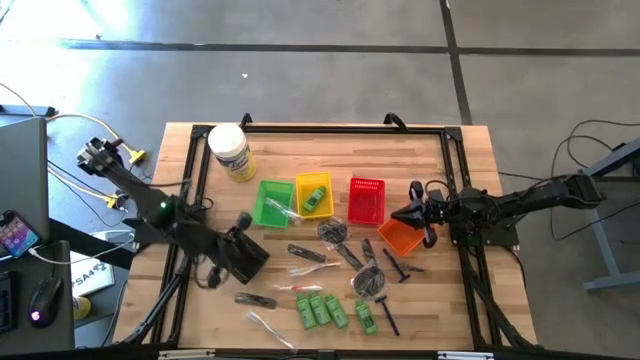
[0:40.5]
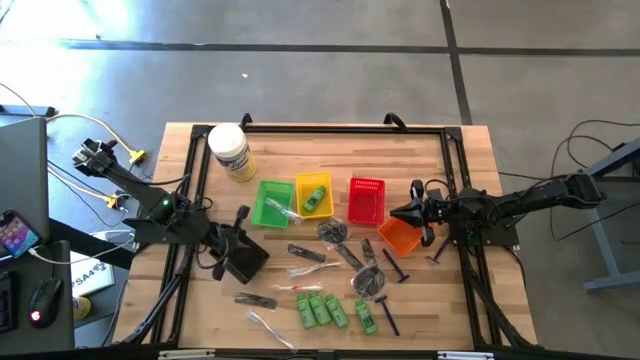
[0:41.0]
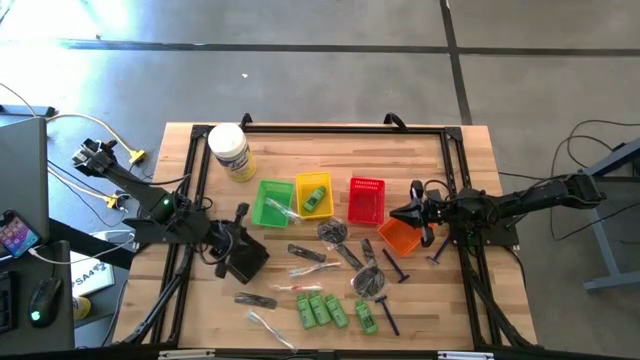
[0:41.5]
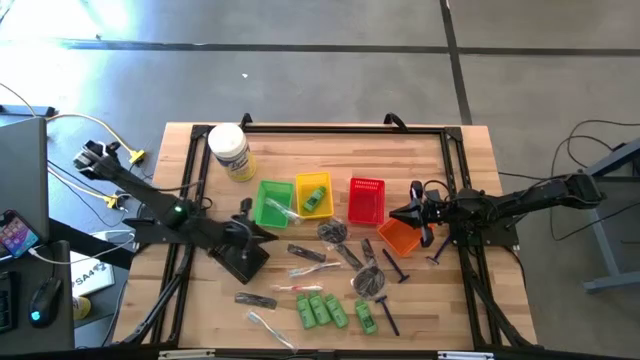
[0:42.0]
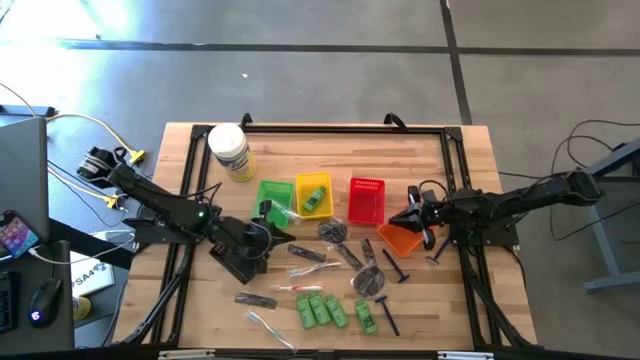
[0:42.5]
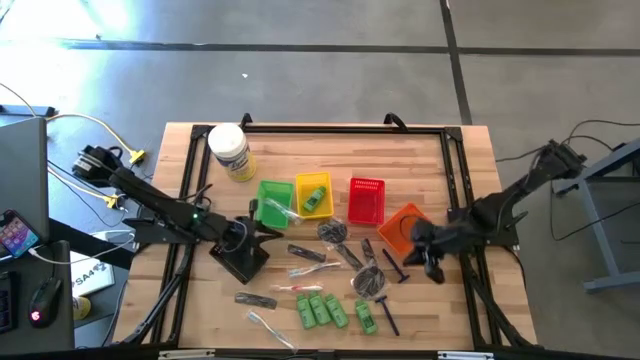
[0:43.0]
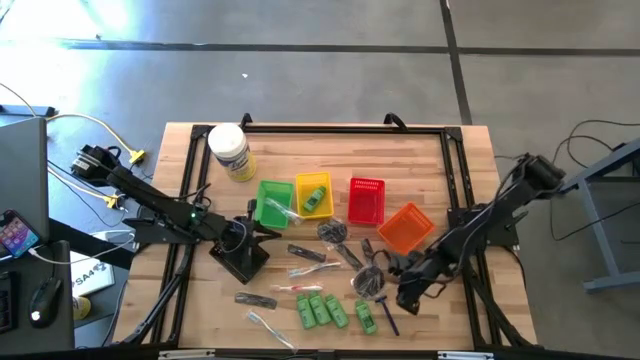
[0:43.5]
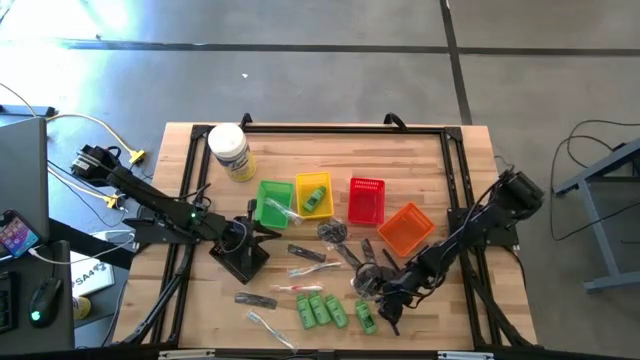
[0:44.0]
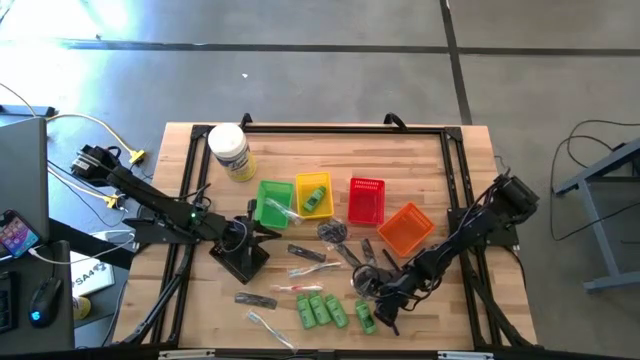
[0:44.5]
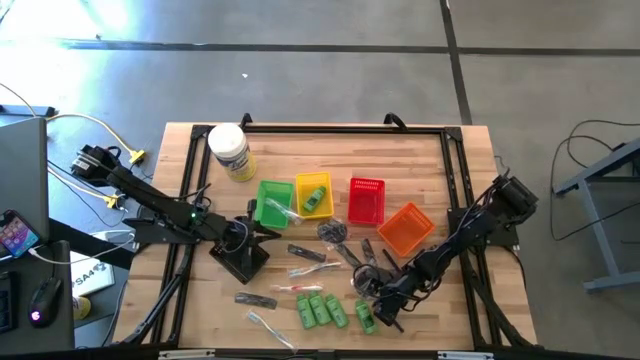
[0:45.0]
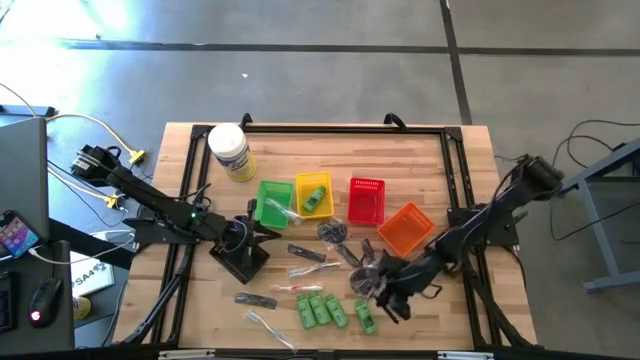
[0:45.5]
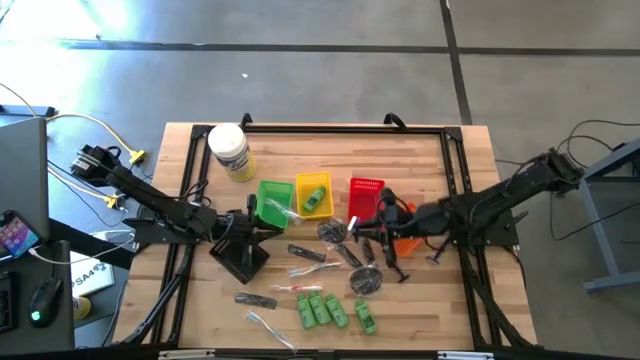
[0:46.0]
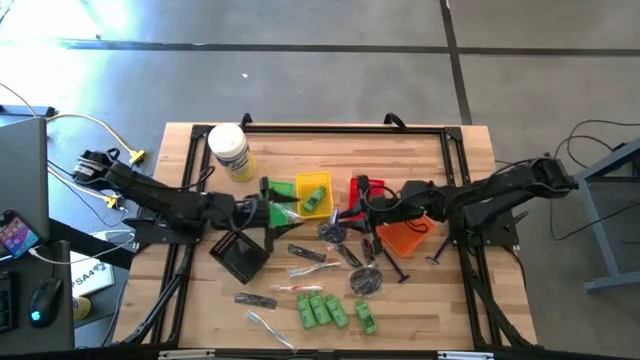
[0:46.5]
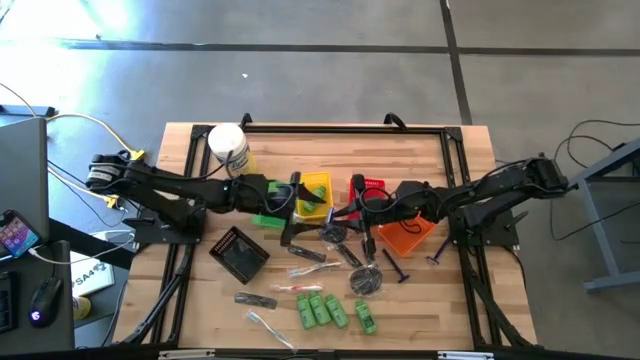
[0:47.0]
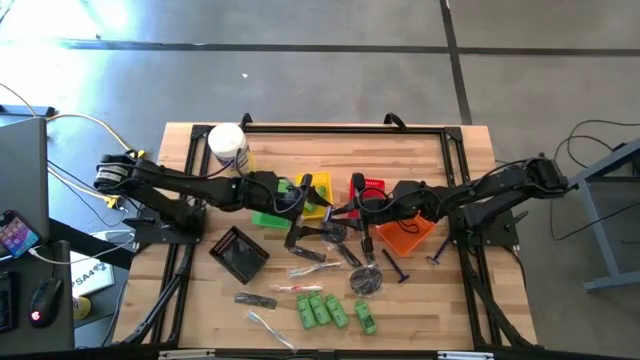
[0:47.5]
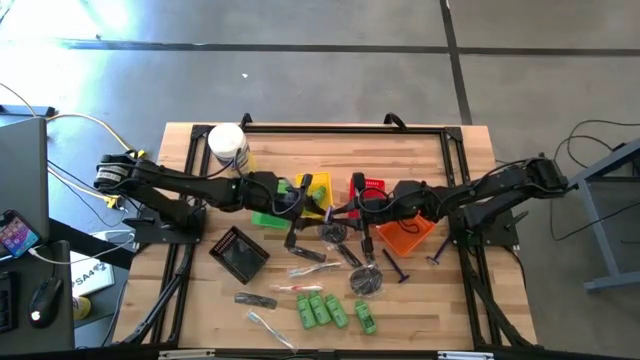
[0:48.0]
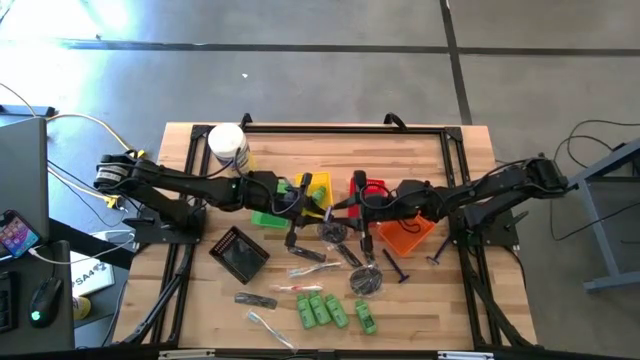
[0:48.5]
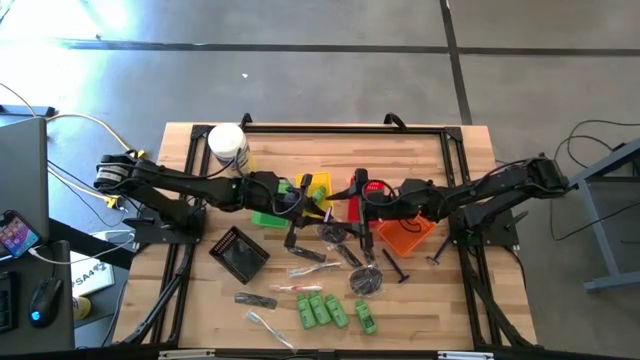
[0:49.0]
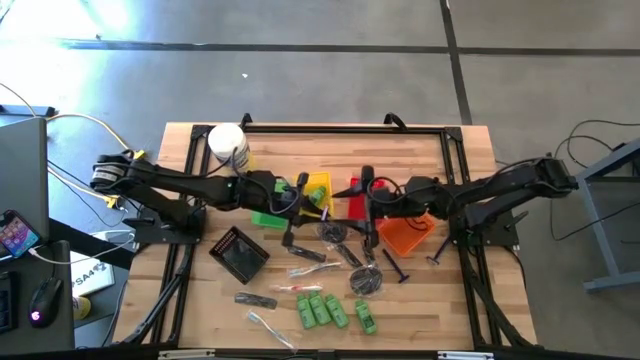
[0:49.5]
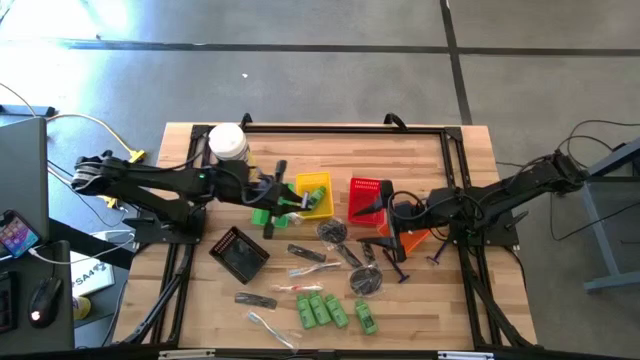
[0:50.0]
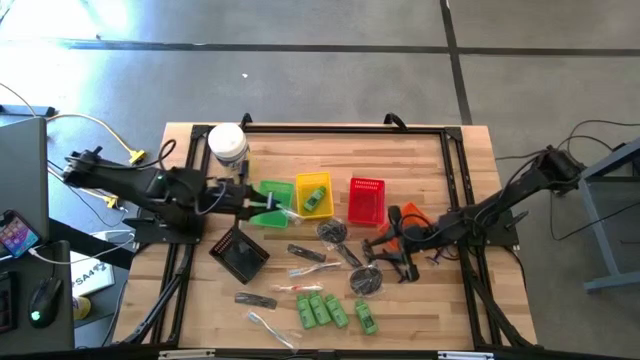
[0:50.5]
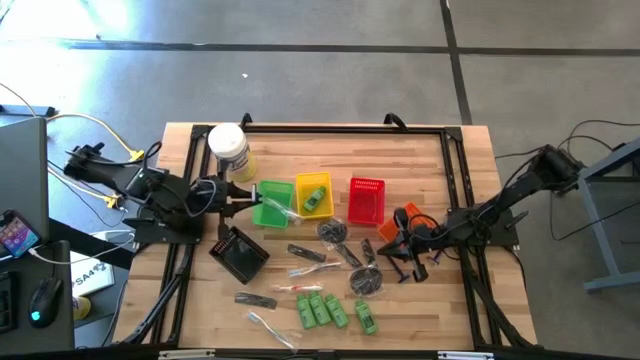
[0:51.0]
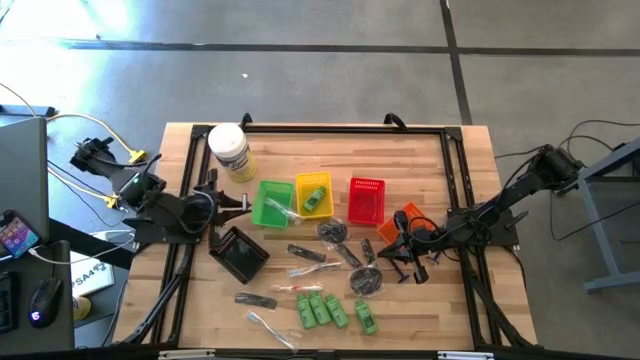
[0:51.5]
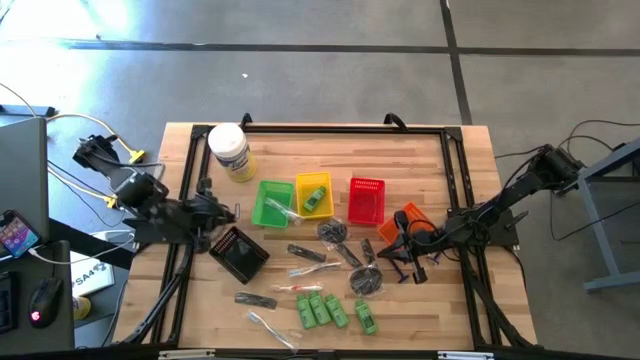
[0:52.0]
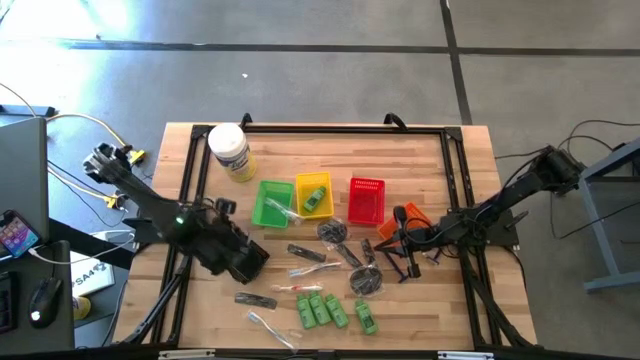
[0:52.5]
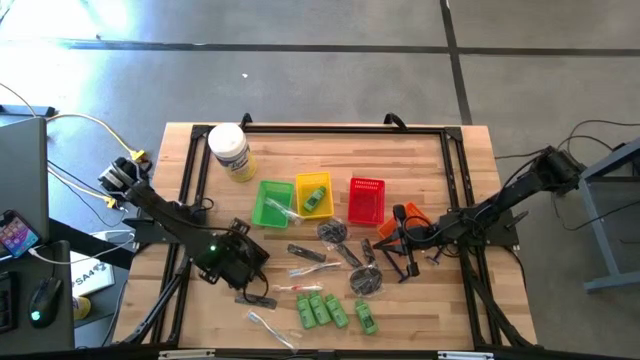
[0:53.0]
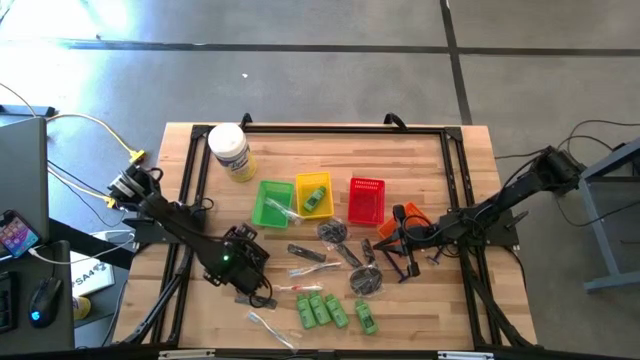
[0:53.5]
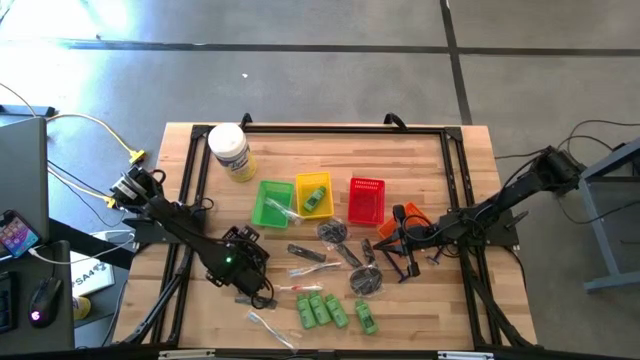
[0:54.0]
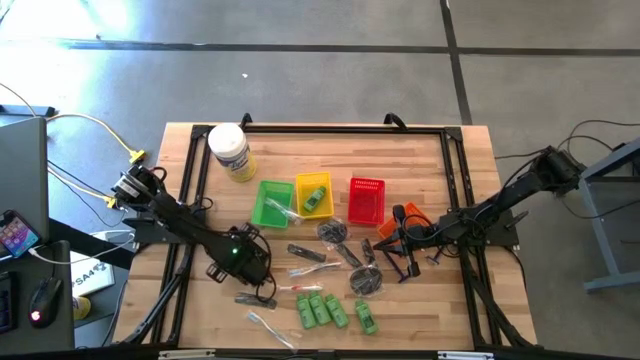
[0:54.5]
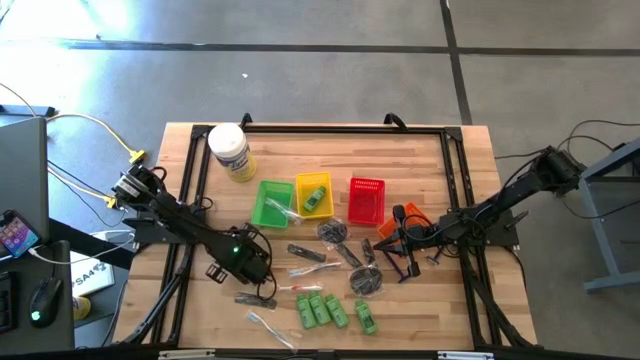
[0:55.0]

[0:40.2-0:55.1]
Task: Pick & Place Travel size toiletries
Put the bottom blue razor into the black basket

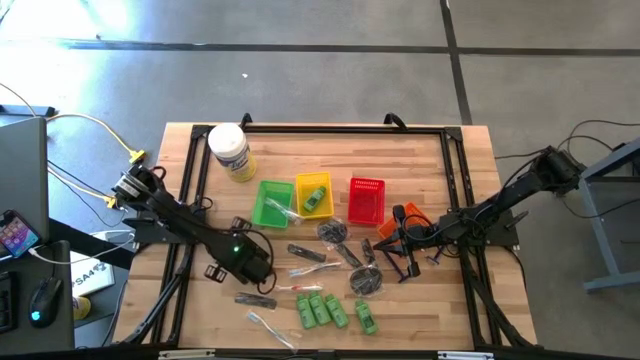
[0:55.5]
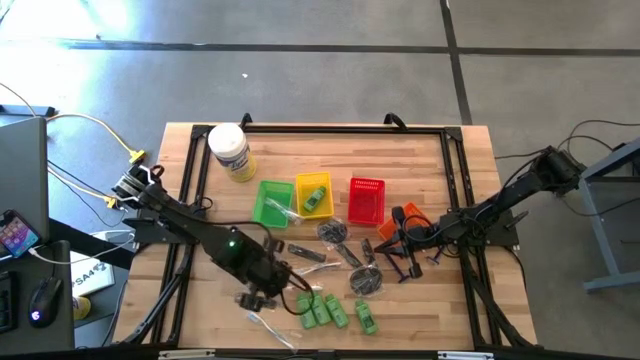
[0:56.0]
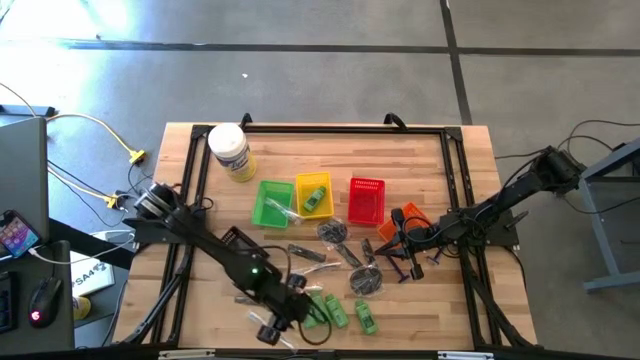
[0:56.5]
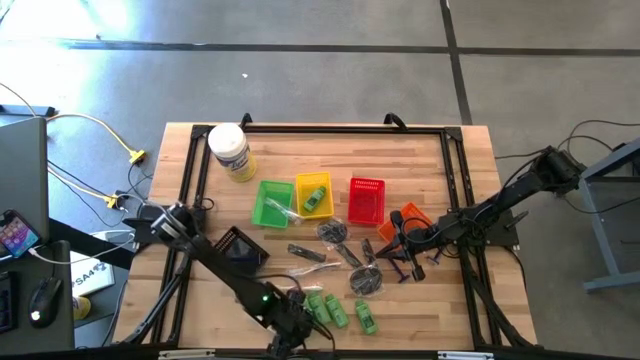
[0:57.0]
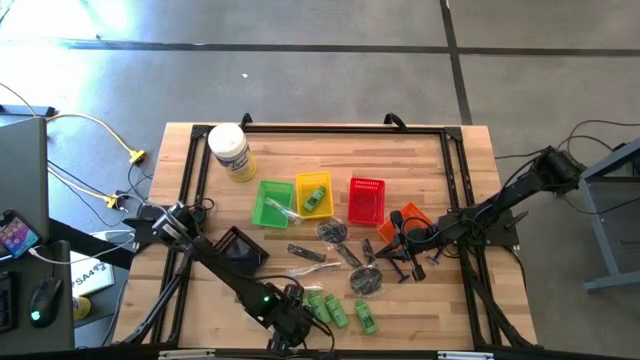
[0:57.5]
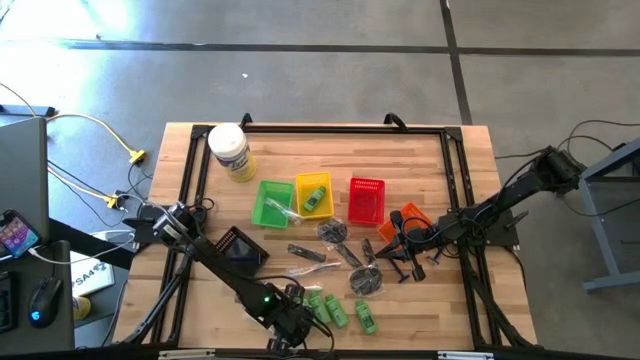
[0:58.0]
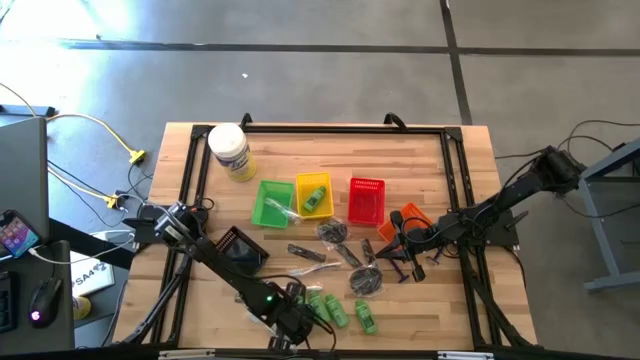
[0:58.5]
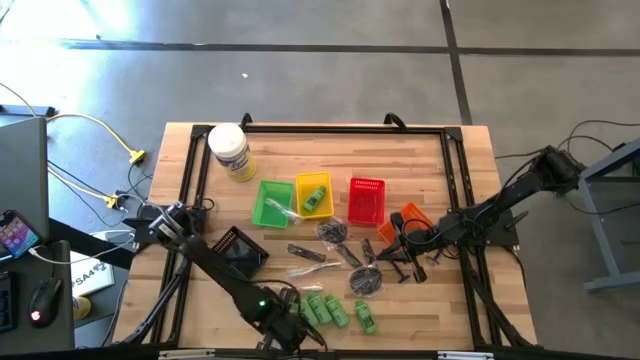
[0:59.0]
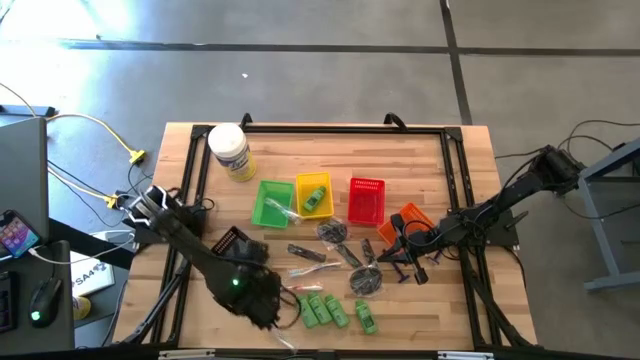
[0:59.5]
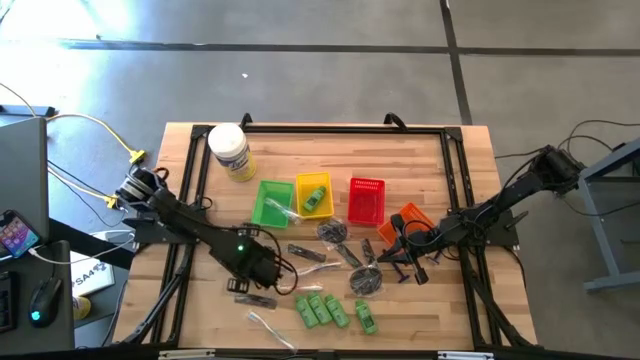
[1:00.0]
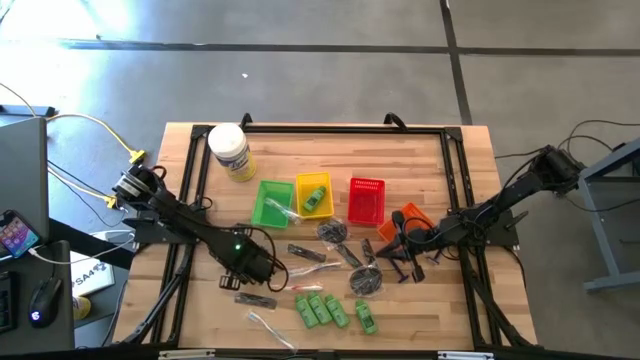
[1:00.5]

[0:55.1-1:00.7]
Put the blue razor lid into the black basket

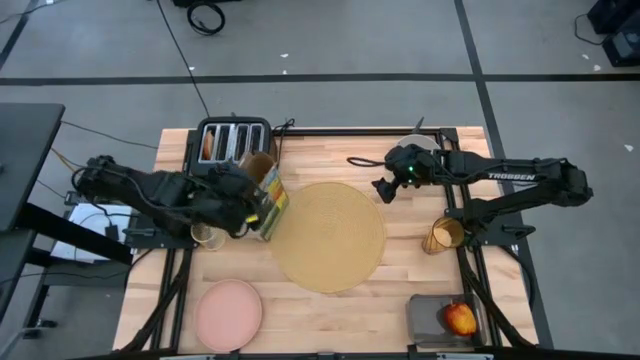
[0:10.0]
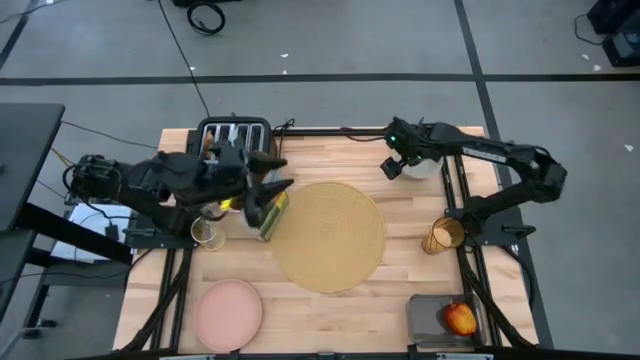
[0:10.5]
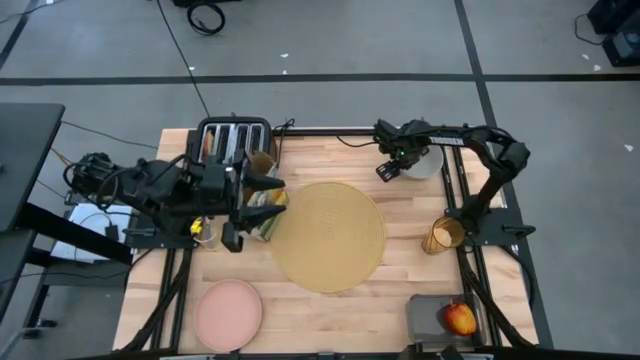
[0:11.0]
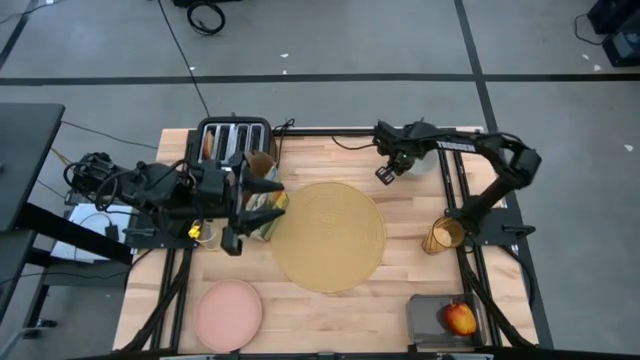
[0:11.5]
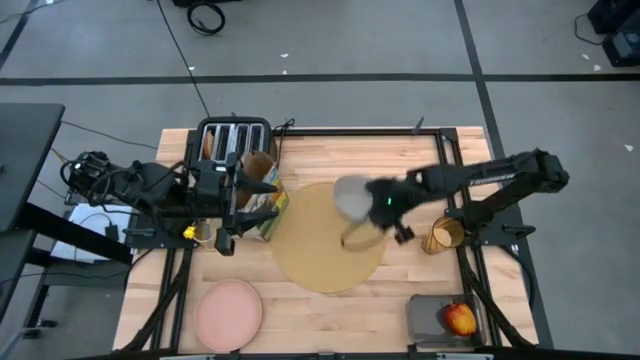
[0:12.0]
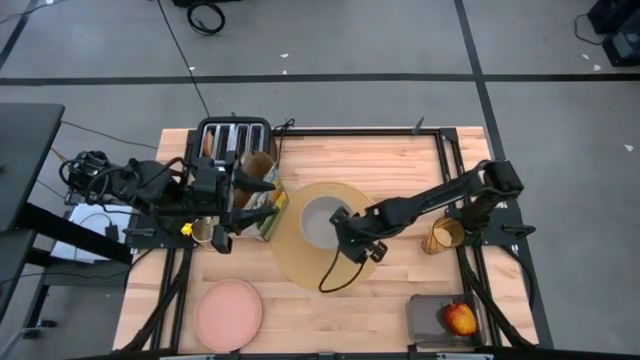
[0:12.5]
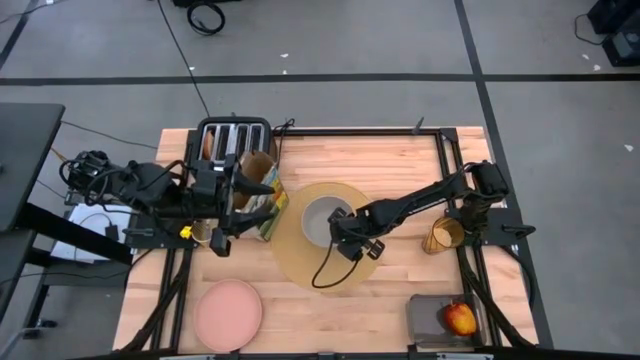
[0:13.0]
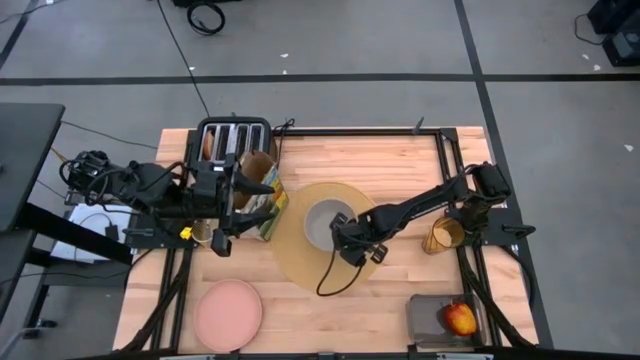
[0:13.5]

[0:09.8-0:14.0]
Task: Arrange a breakfast setting
Put the gray bowl on the placemat
